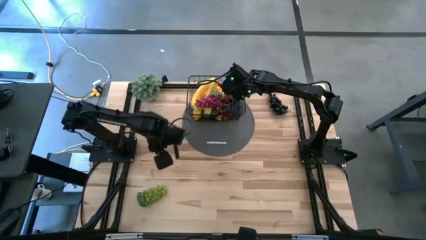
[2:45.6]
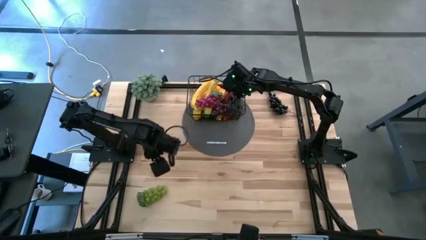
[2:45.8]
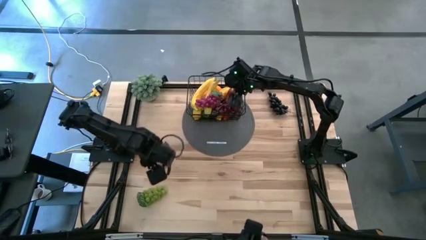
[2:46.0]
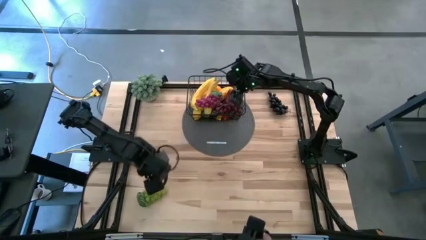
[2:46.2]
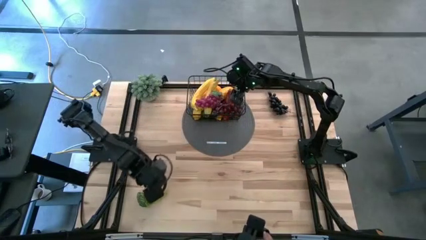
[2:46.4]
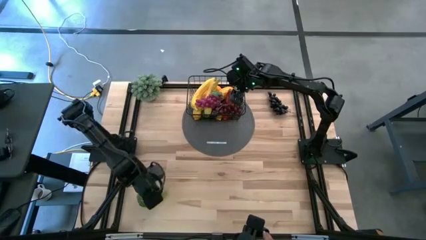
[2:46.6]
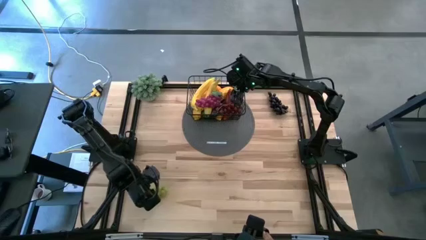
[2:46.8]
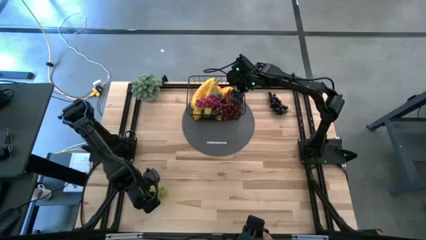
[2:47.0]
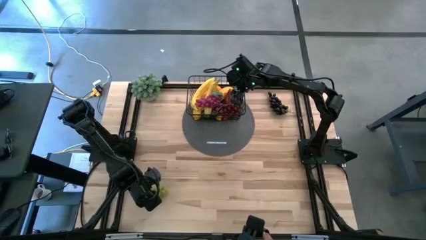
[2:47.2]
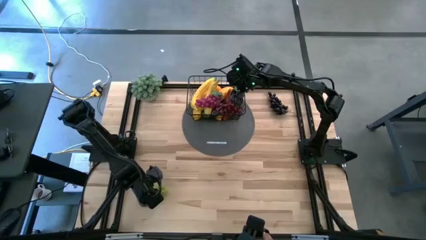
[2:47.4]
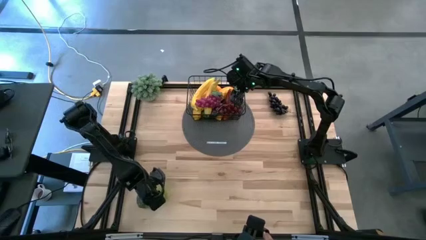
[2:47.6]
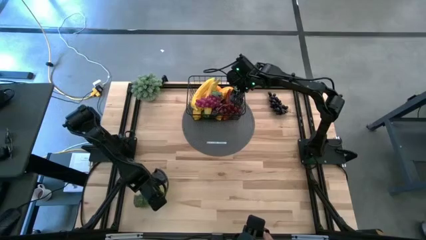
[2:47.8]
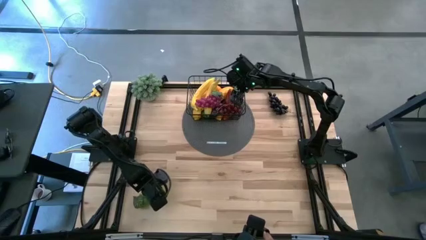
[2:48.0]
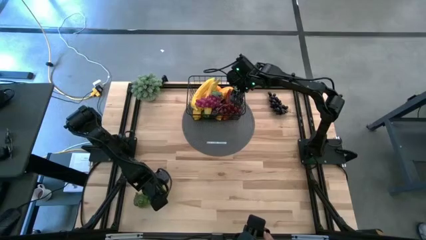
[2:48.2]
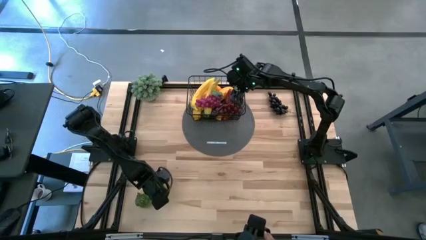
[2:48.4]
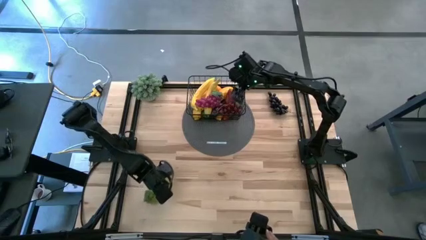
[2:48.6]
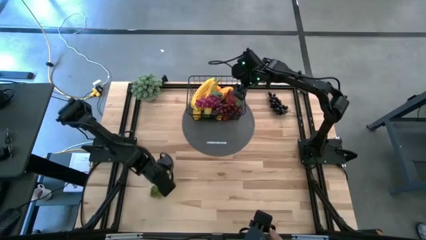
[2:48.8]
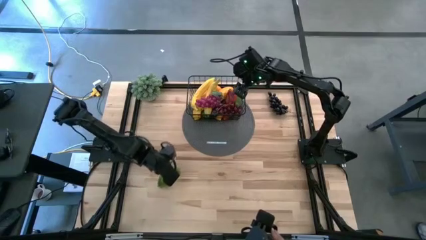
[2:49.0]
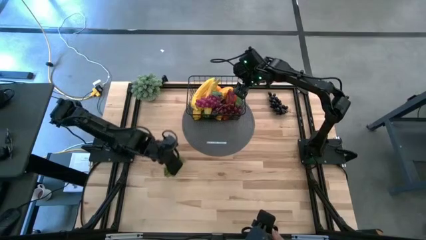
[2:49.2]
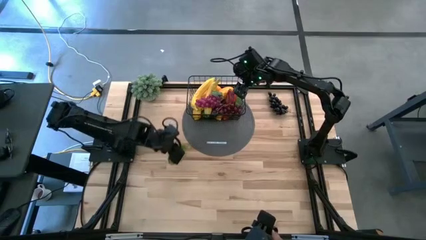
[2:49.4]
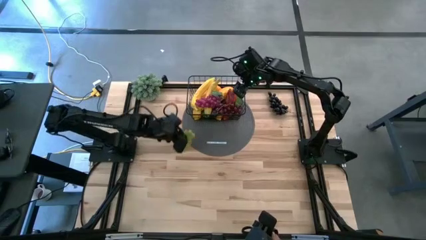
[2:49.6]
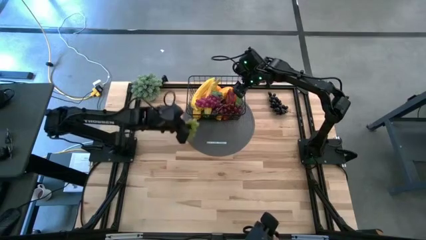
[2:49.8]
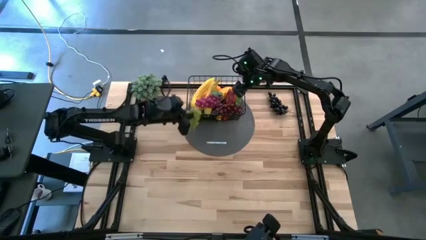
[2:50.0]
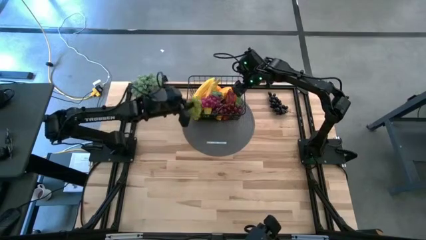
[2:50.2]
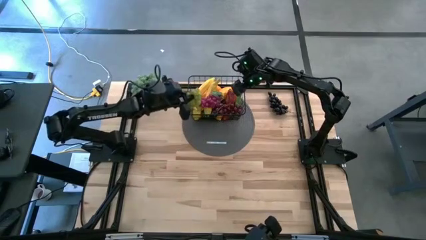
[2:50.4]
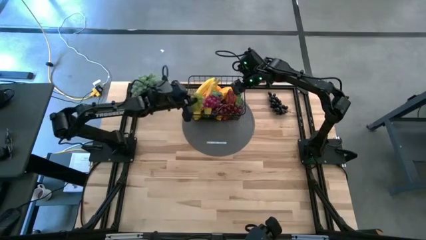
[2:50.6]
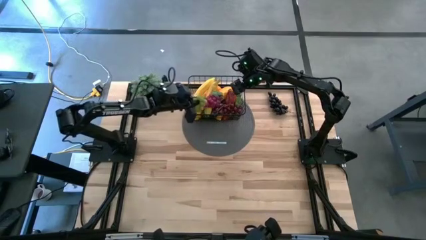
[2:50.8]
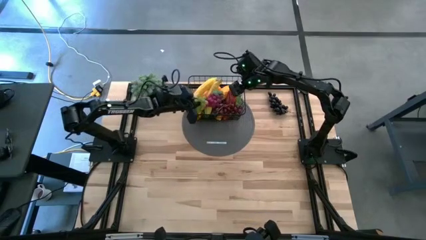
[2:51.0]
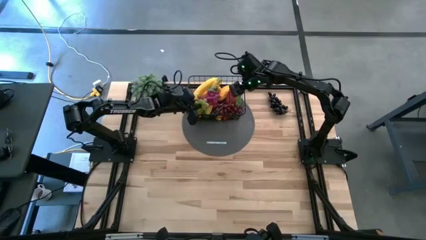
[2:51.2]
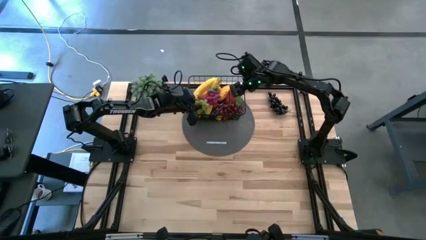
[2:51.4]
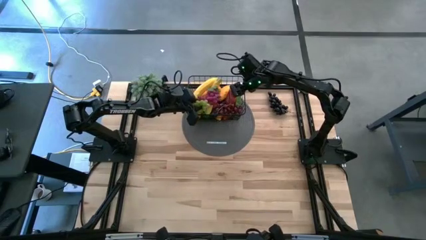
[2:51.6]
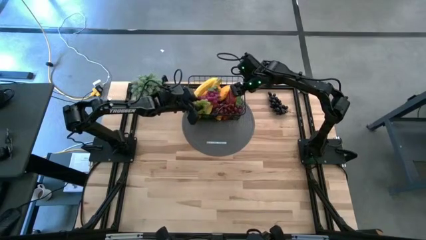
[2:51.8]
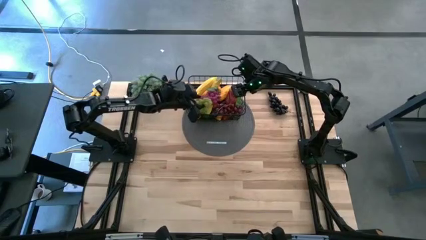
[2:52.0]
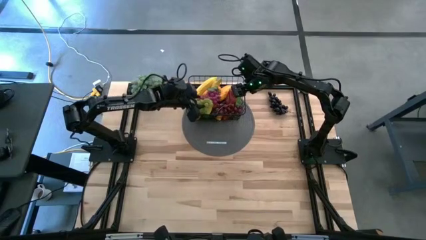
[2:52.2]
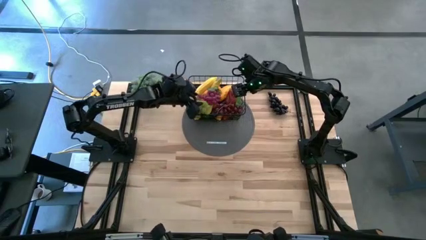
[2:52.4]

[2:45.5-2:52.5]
Task: Build produce basket
Put the green grapes into the black wire basket

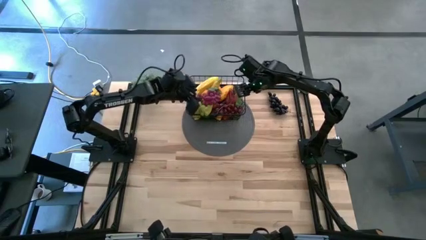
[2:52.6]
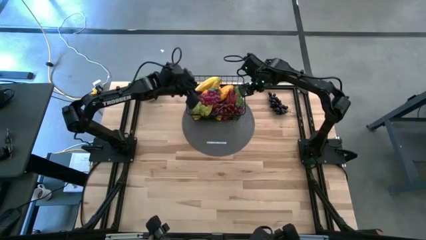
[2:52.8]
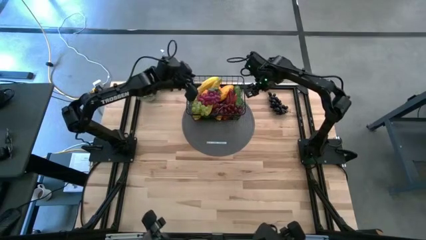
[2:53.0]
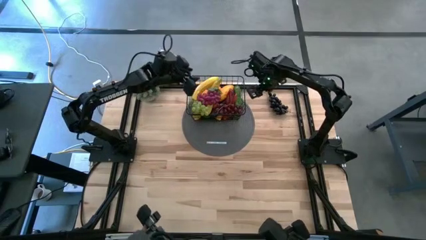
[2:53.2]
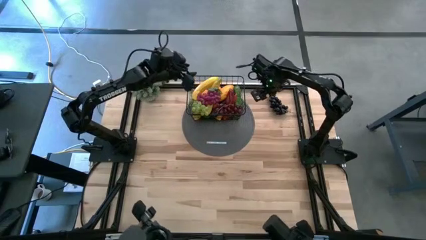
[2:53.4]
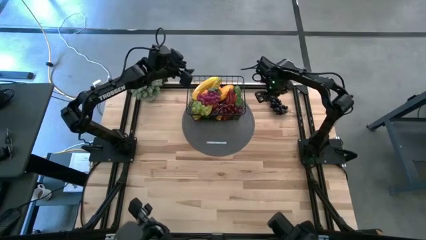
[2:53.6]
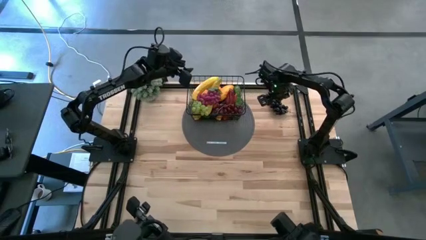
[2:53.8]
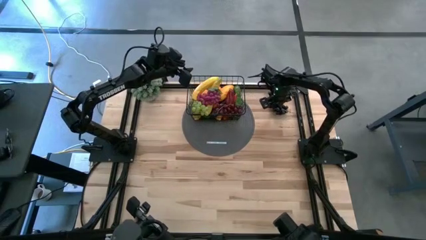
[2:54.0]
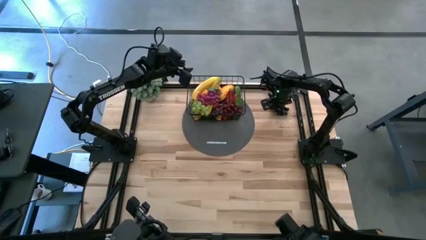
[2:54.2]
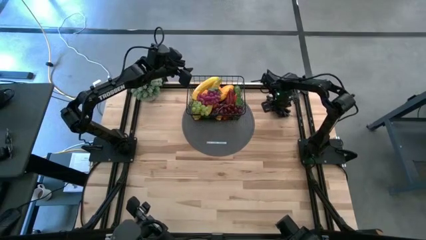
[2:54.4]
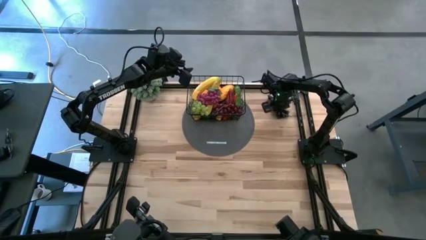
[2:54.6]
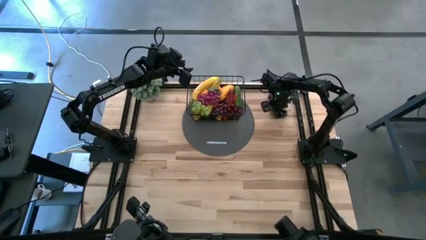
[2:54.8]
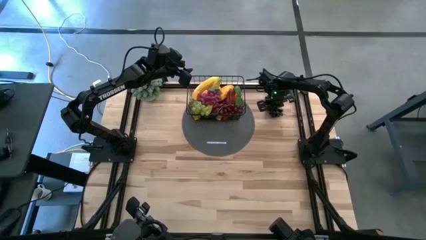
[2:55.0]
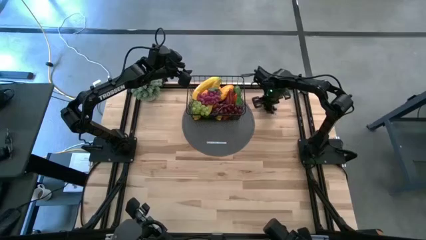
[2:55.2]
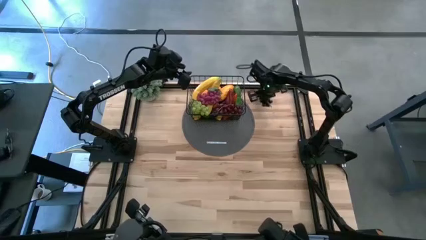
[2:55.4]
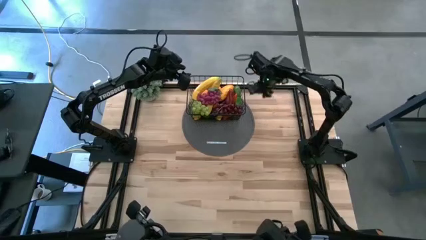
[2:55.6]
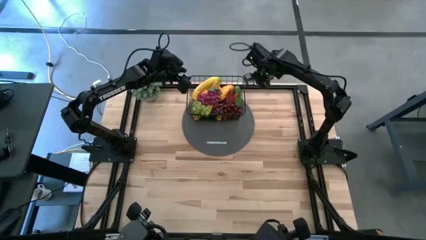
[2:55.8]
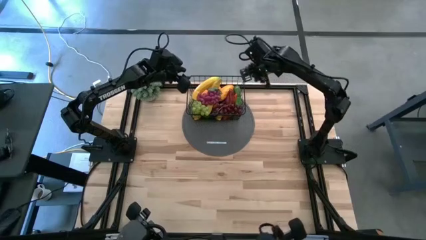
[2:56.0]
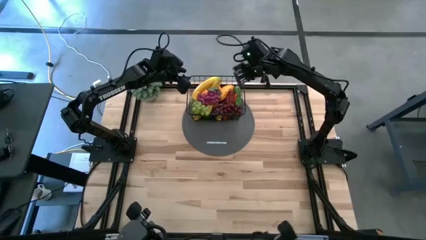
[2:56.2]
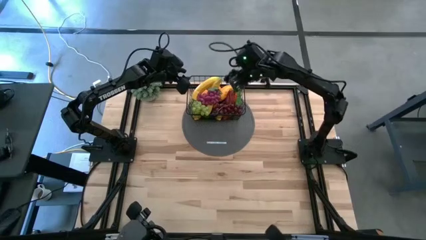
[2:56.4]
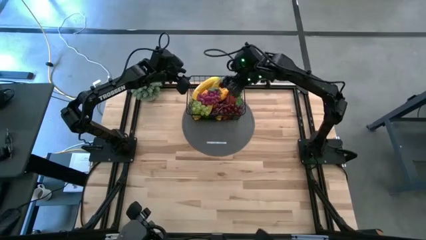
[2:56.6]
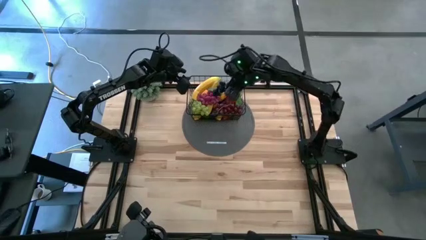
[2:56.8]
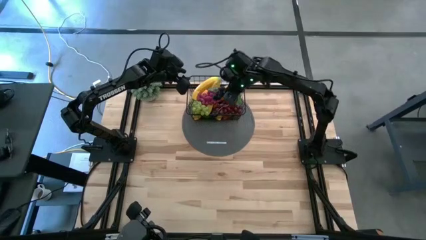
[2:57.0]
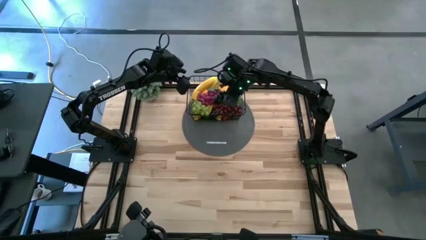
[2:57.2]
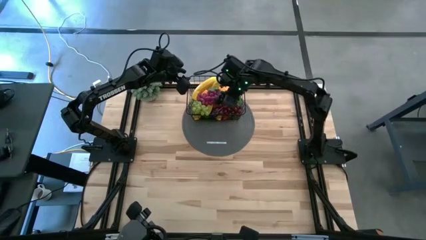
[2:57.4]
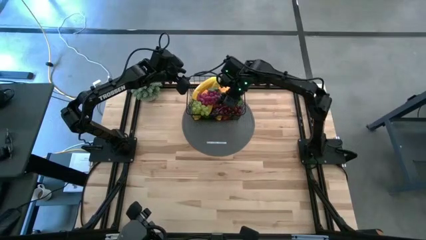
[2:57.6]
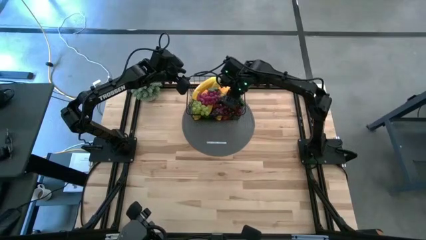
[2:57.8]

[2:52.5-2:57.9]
Put the purple grapes into the black wire basket
